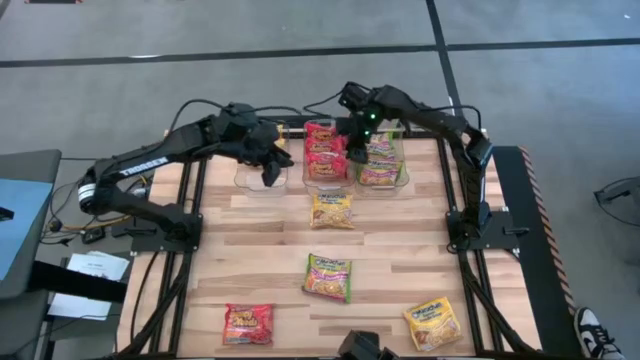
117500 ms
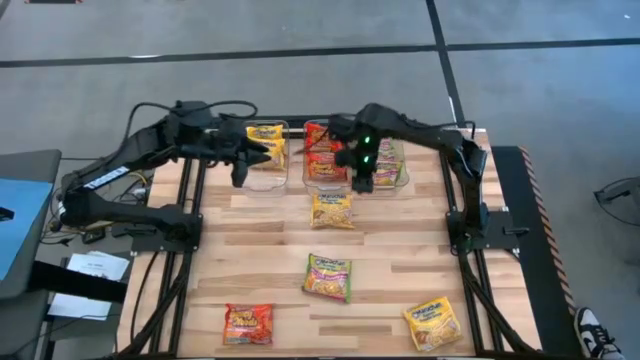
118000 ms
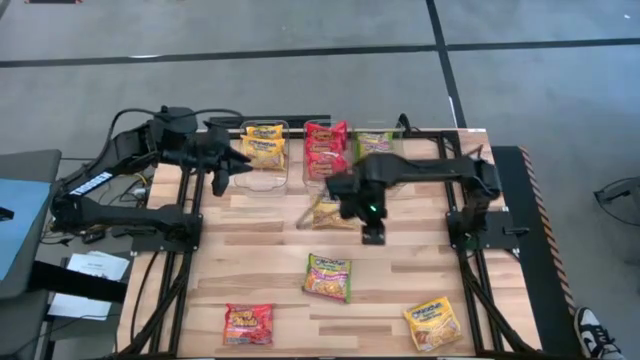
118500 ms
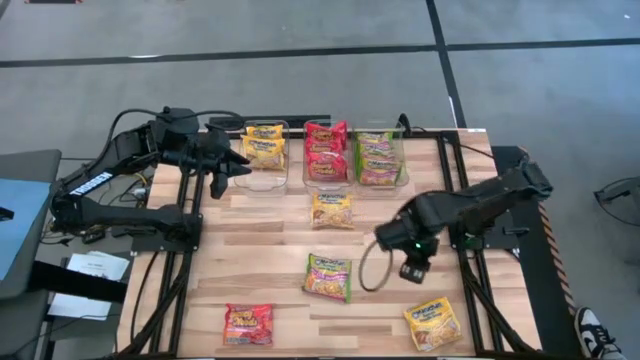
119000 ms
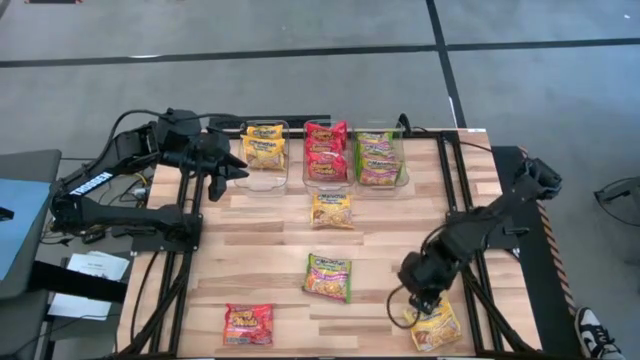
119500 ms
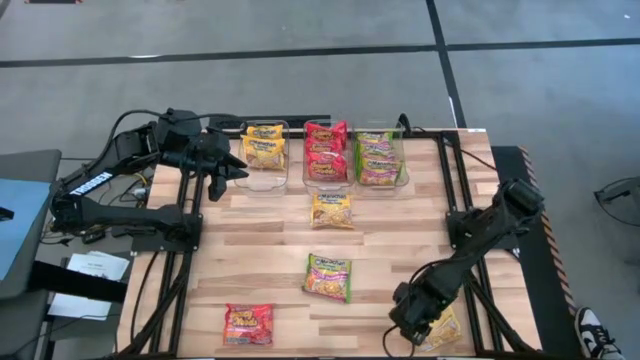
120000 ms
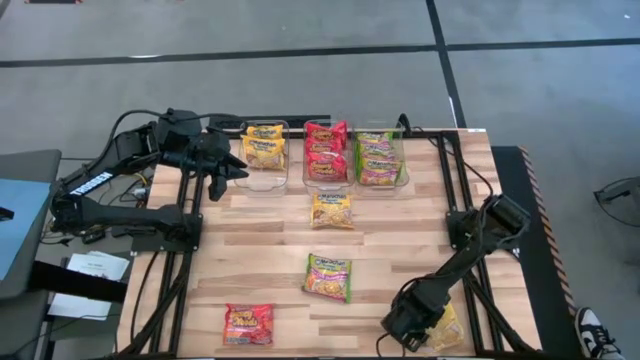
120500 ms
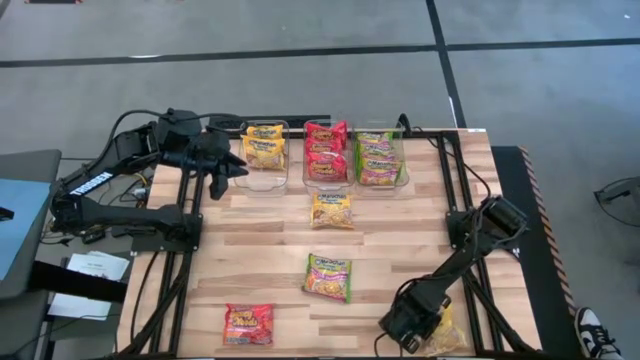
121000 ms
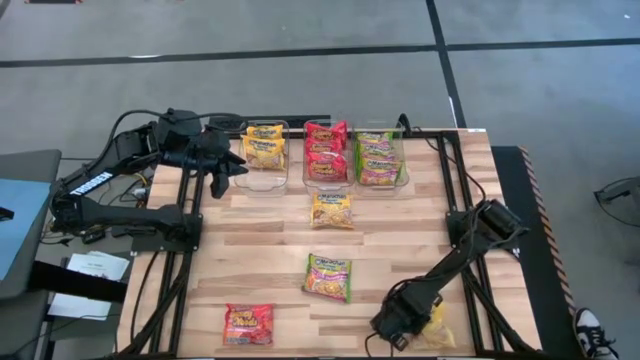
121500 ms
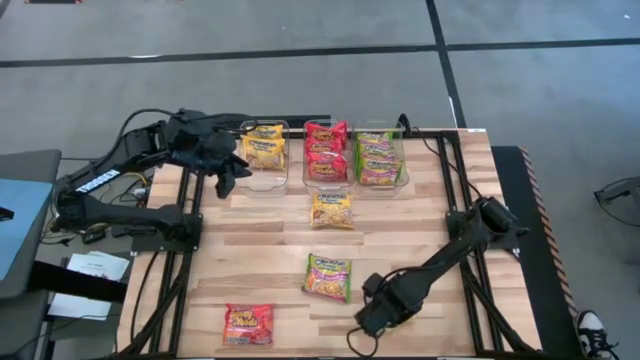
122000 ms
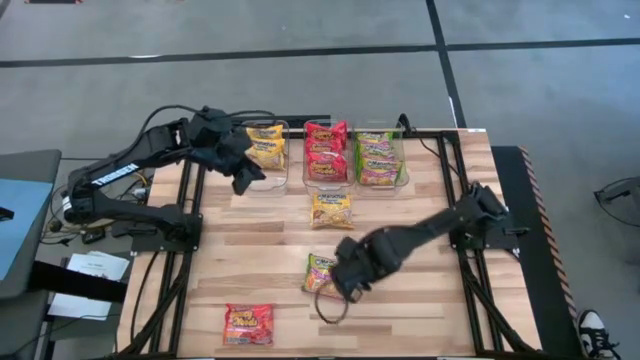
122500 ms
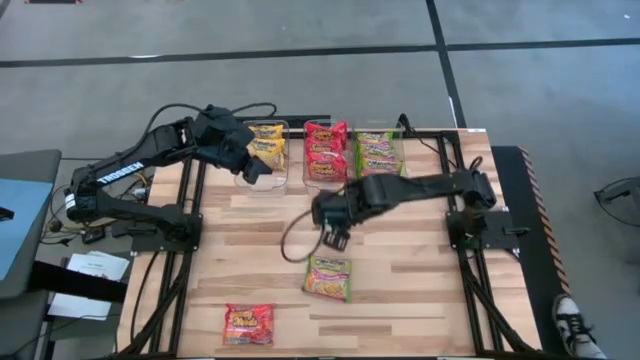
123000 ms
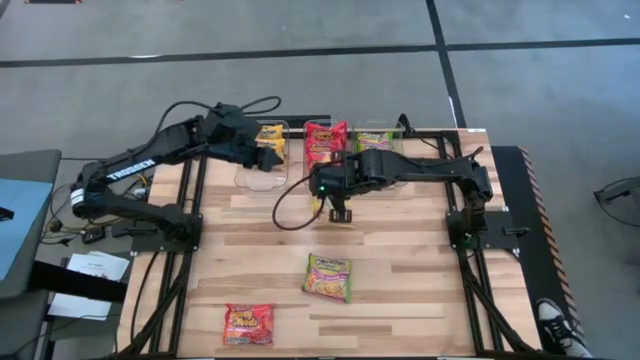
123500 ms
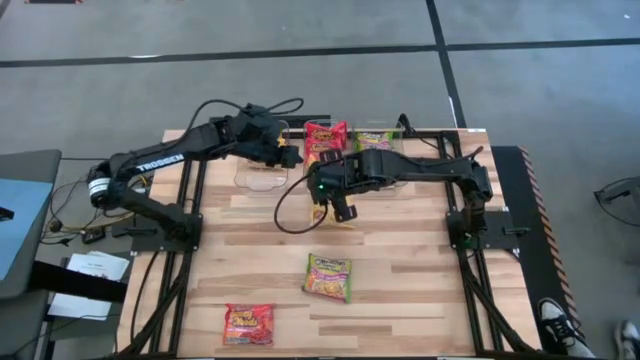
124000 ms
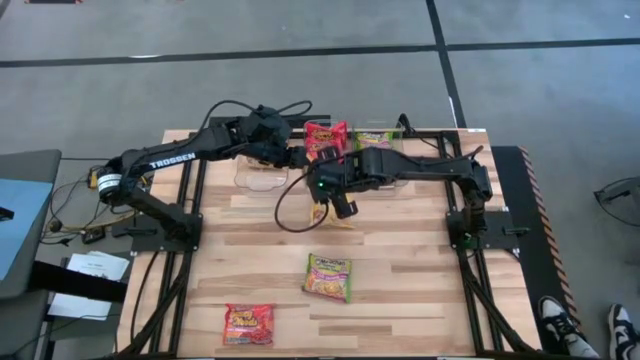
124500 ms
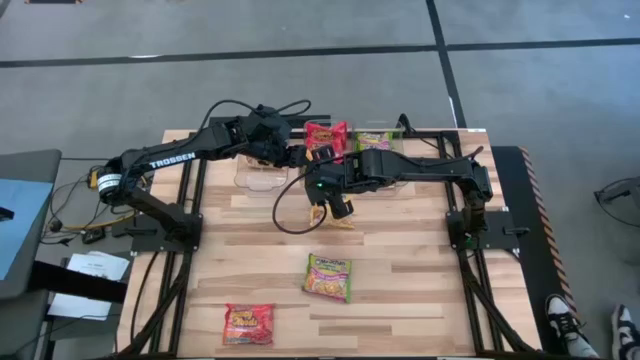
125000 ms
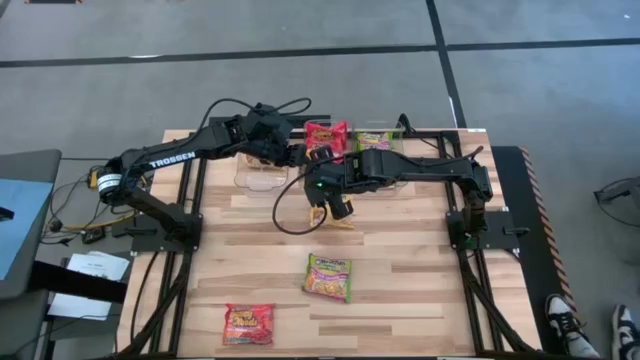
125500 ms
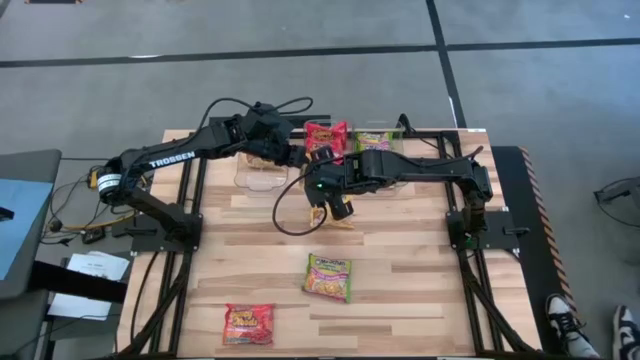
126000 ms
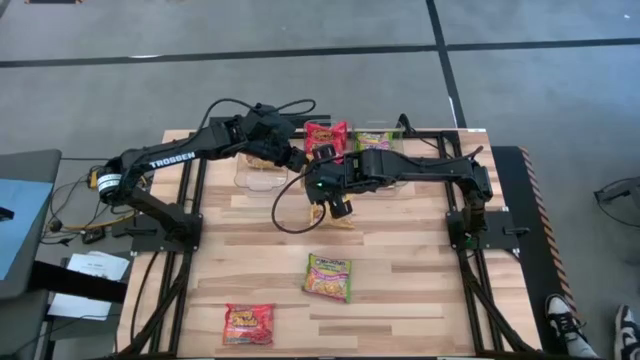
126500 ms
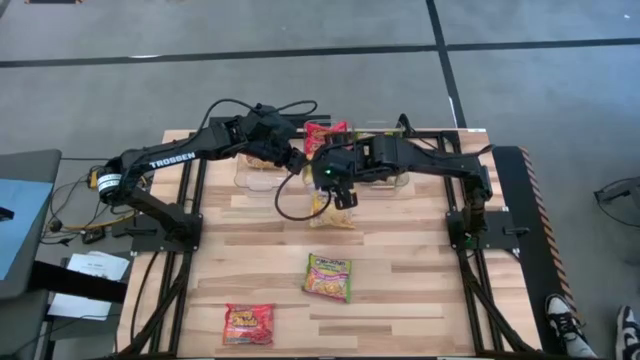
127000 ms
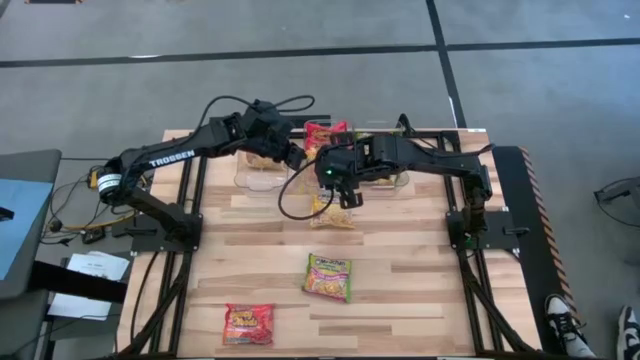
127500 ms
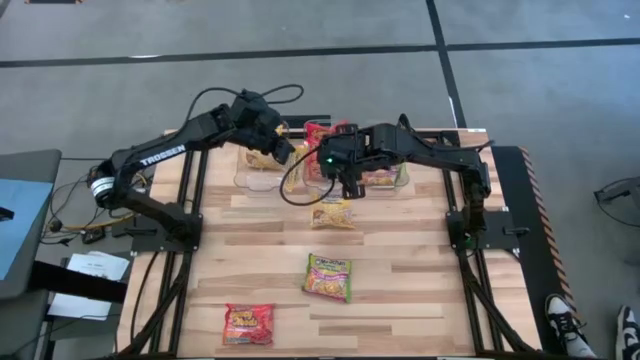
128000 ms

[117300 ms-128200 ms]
Task: Sort Maruchan noodles
Put the yellow noodle pack into the left transparent bin

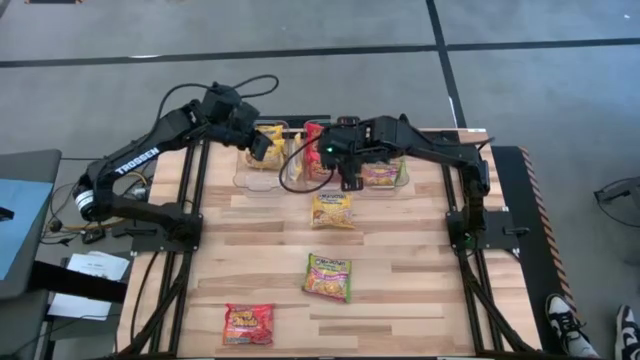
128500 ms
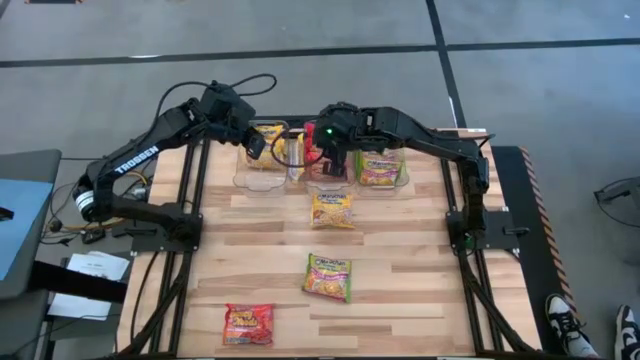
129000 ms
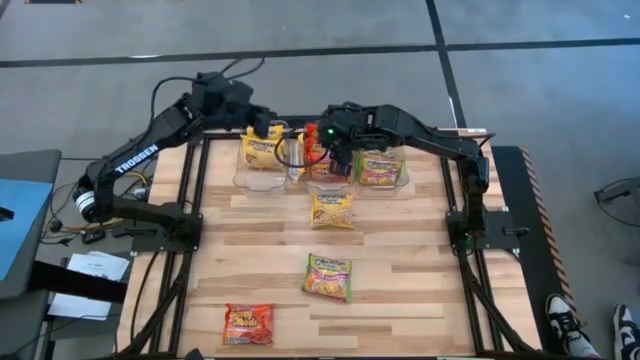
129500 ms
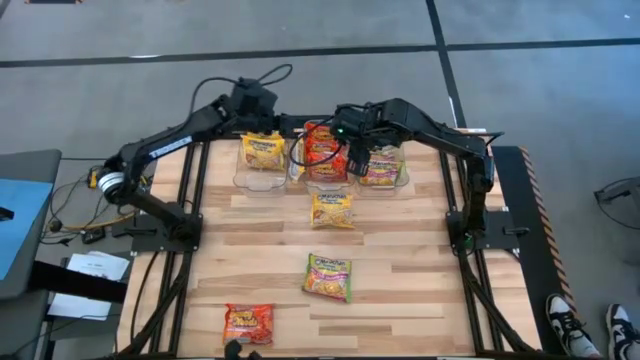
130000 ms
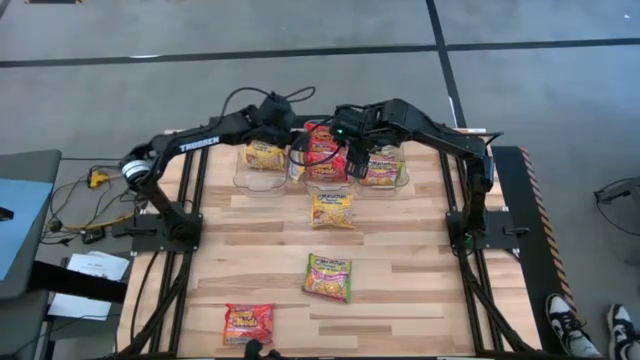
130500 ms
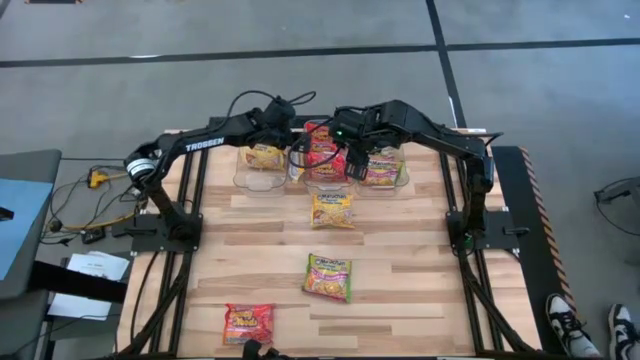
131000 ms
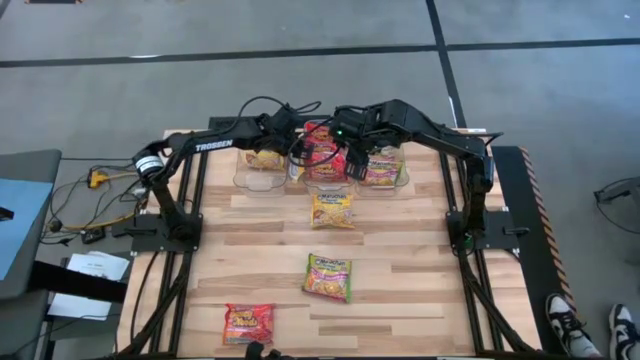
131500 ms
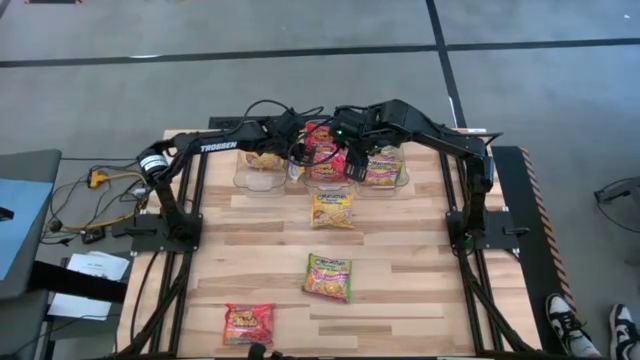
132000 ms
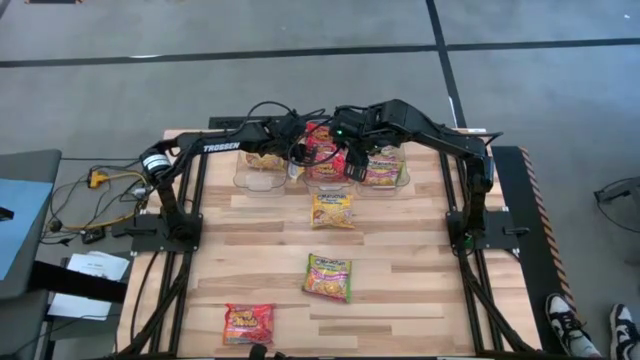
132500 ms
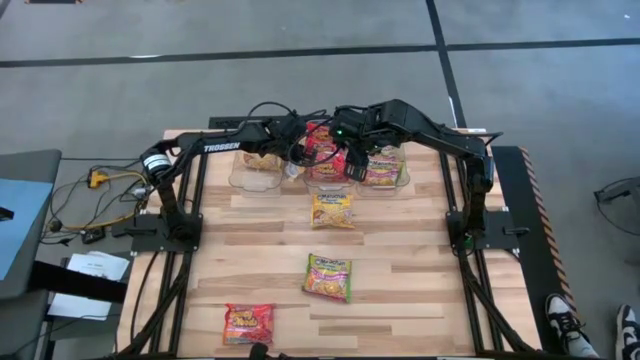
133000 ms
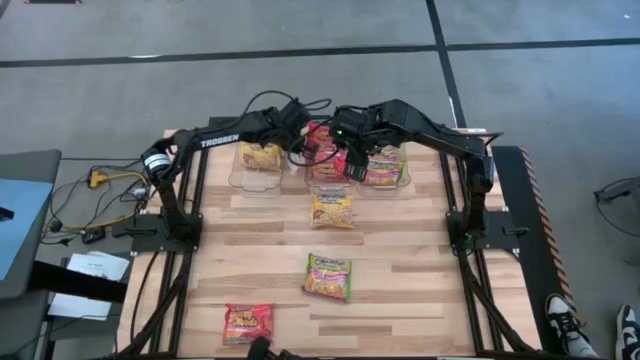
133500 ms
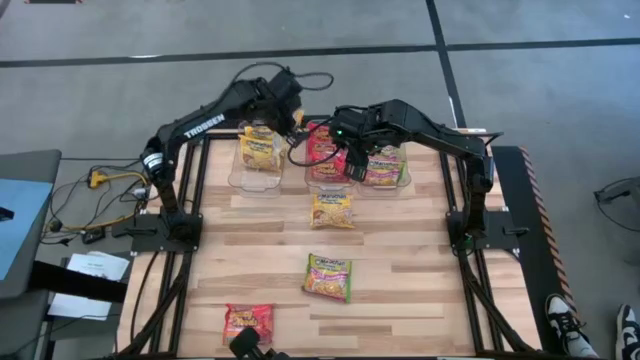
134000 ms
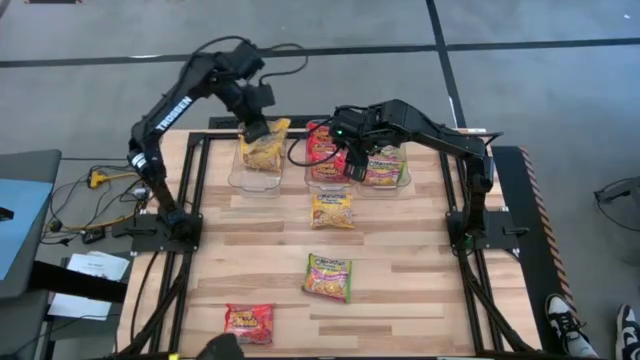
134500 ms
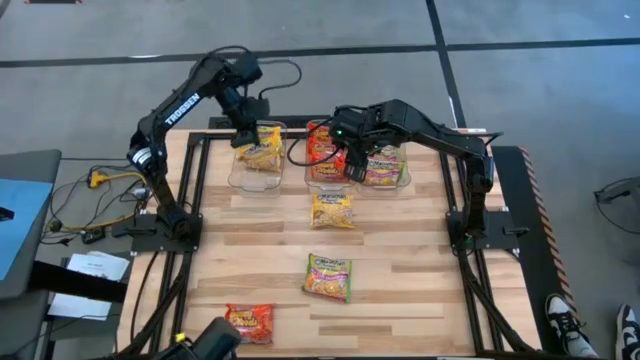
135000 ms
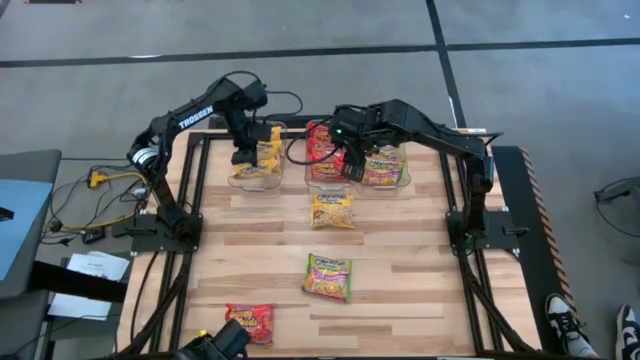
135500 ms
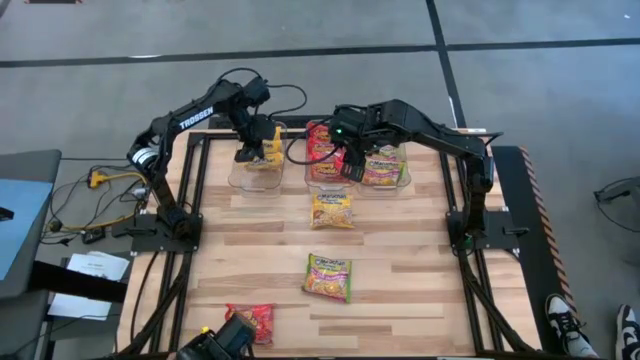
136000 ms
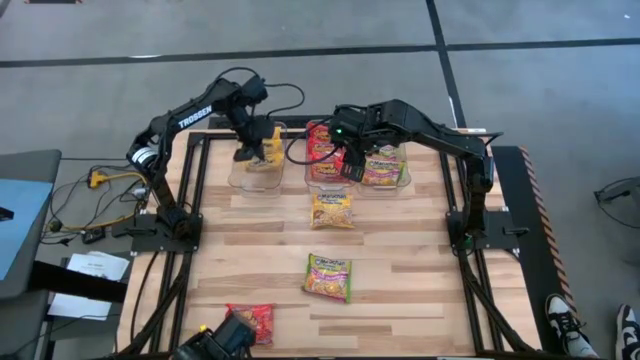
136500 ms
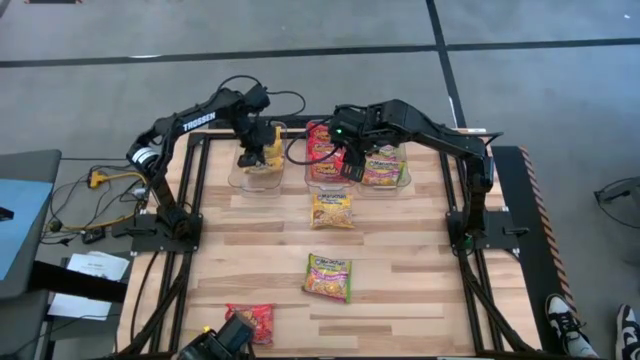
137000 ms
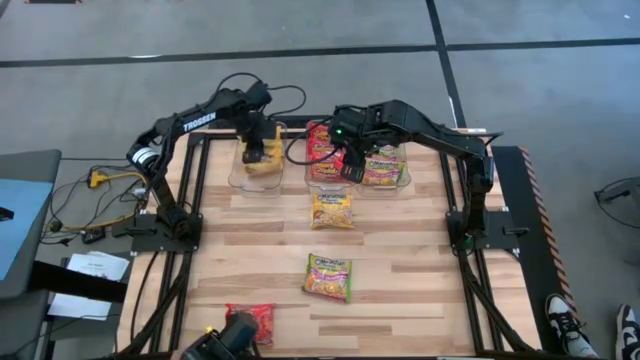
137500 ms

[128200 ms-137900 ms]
Put the yellow noodle pack into the left transparent bin
